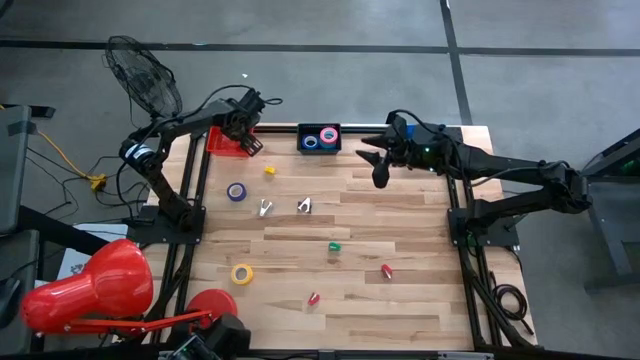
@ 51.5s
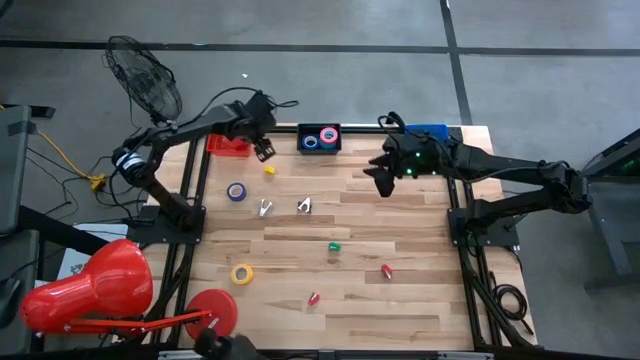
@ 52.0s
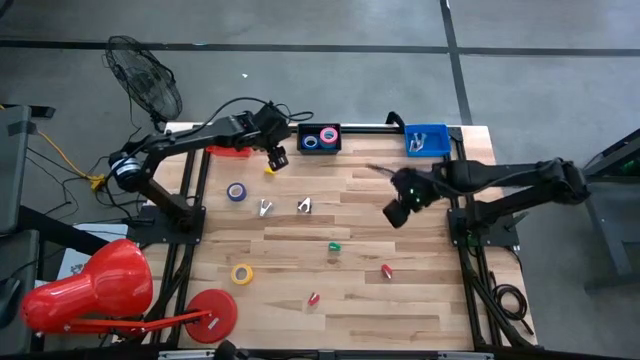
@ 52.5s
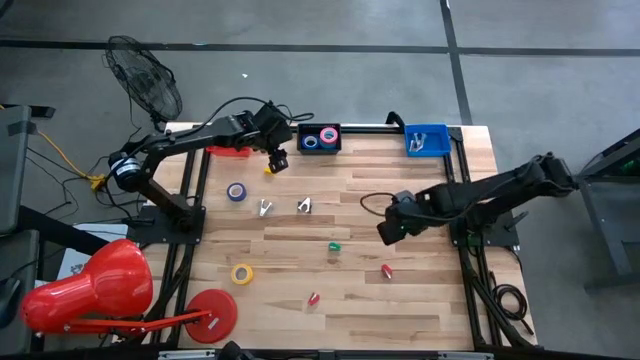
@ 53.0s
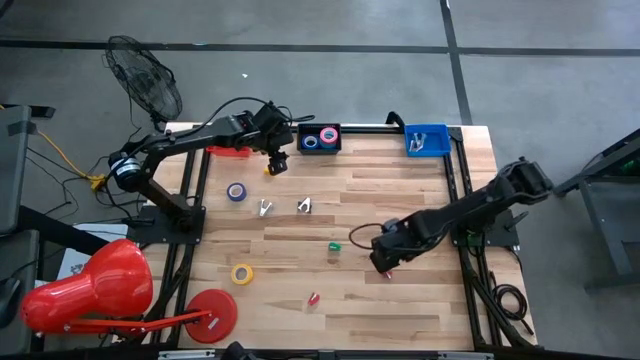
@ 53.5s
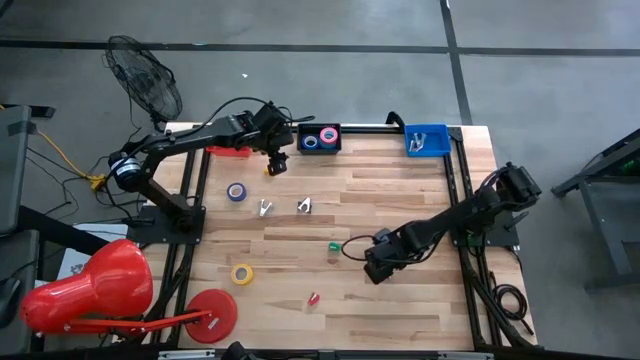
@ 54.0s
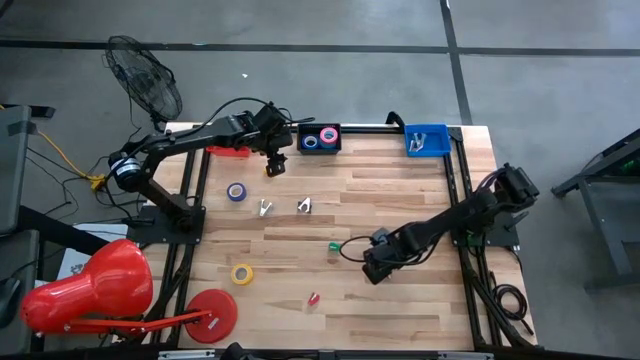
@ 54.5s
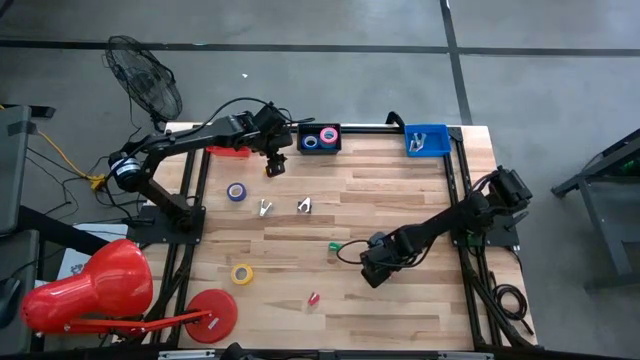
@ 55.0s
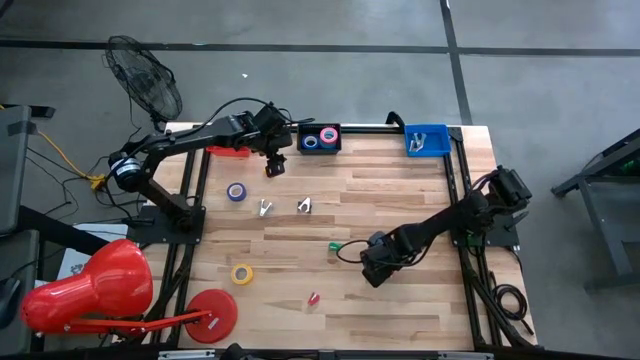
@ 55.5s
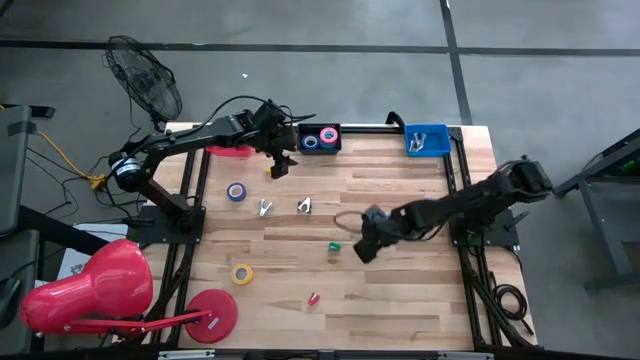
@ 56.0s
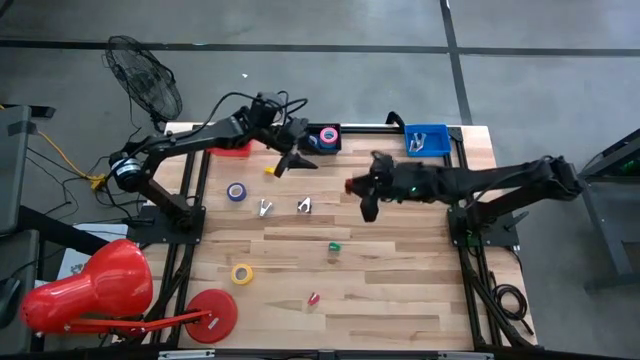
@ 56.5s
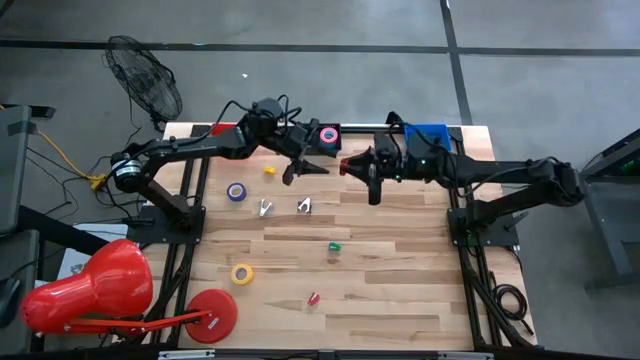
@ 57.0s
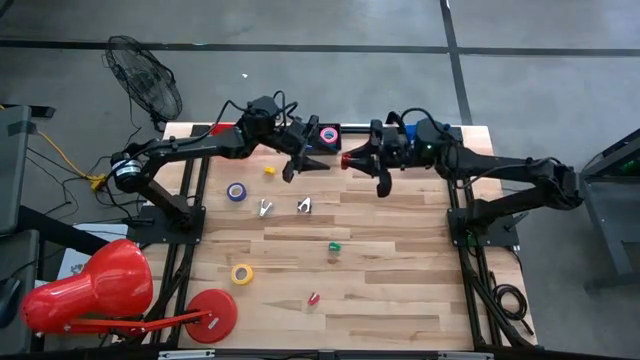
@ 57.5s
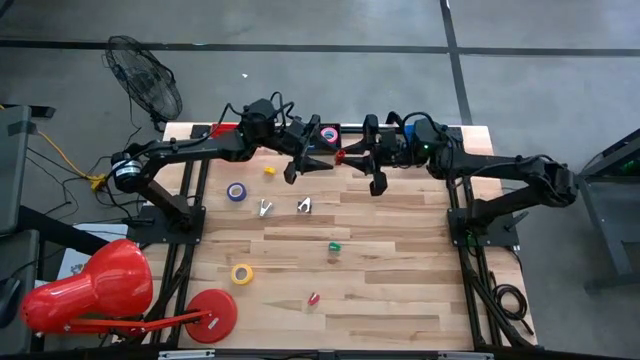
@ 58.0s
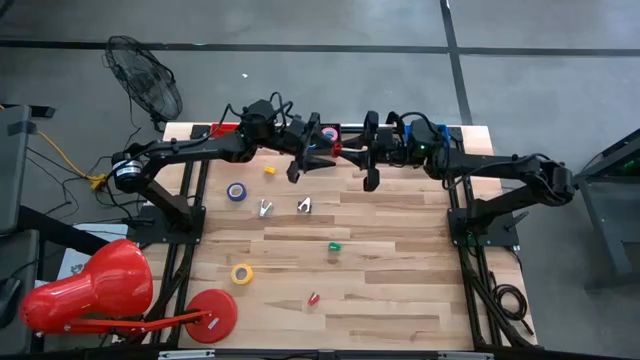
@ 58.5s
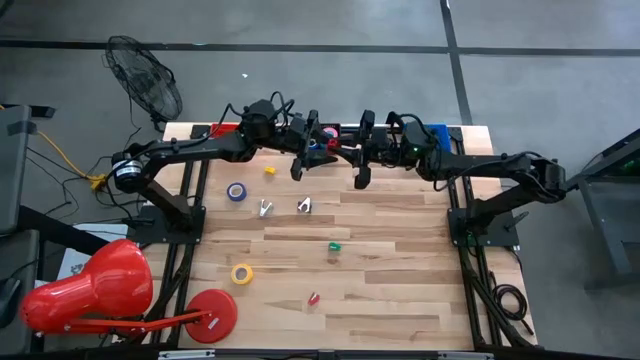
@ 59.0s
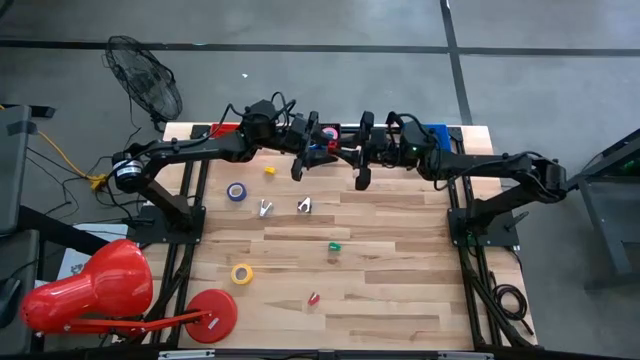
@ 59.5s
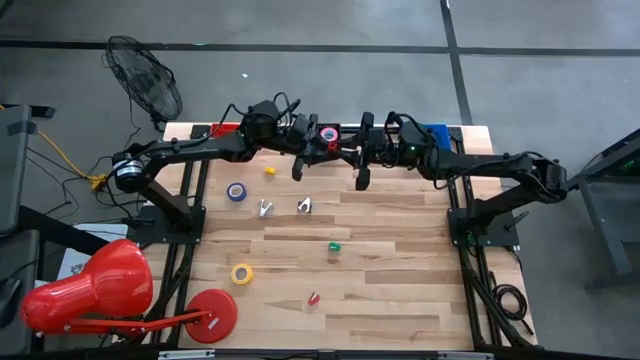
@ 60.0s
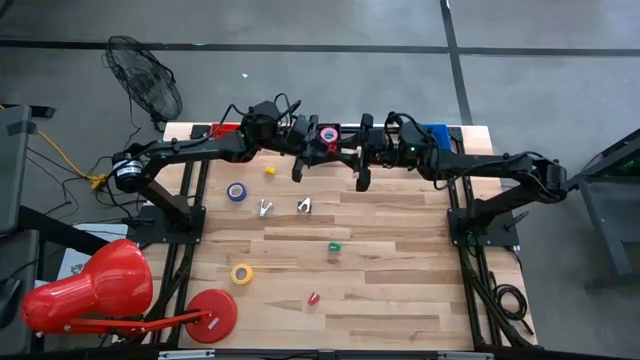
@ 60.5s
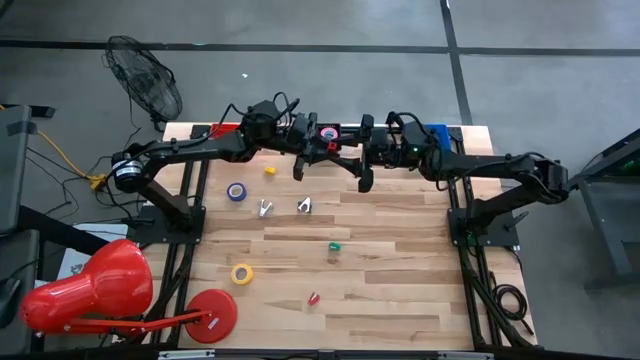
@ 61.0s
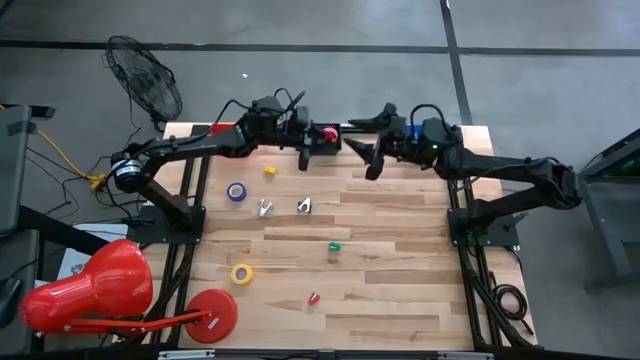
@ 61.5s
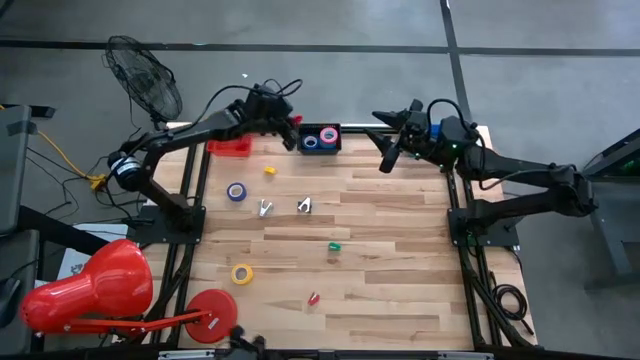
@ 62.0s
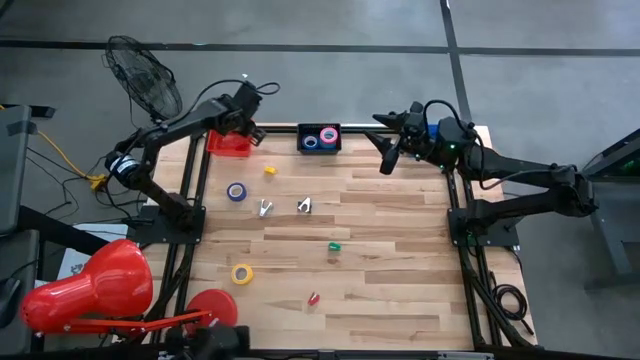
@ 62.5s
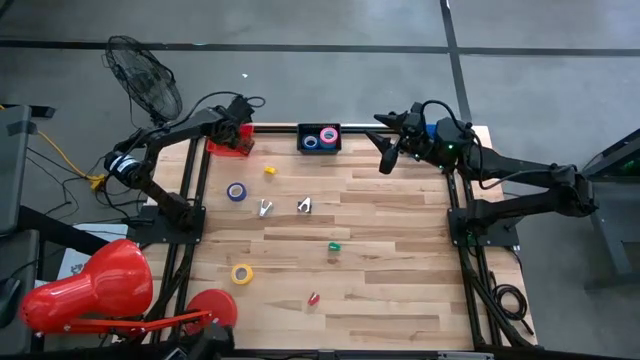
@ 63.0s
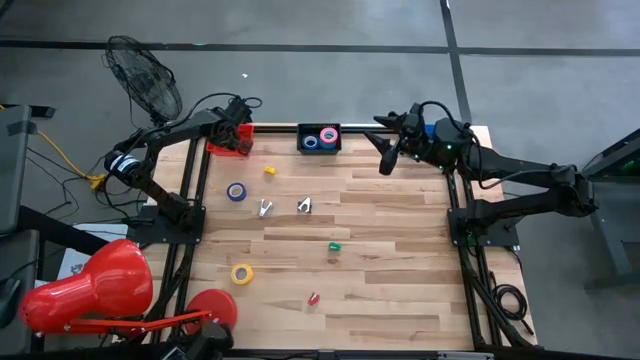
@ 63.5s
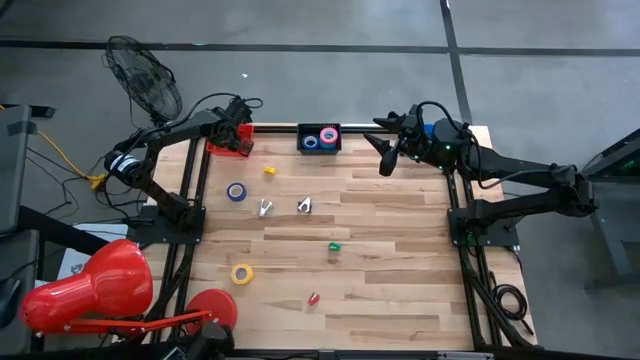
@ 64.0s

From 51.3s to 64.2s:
Task: Pick and place Stapler, Stapler remover, tape
Put the right red stapler into the red bin

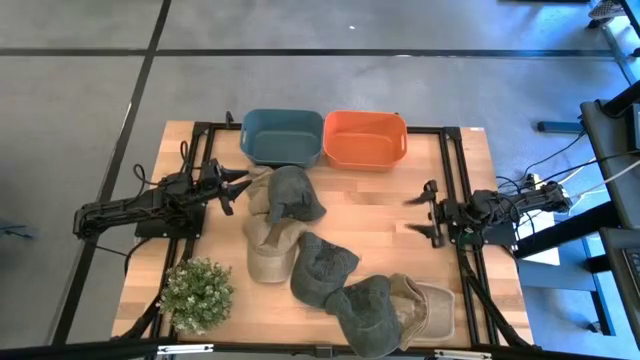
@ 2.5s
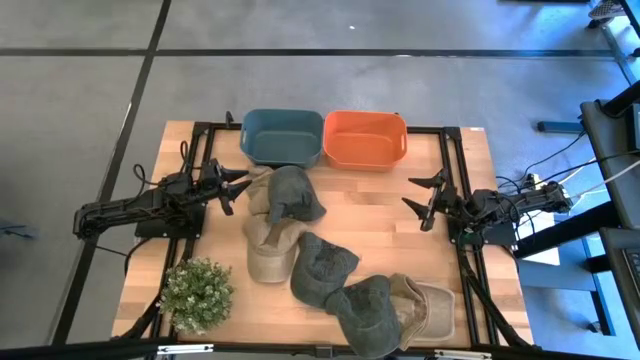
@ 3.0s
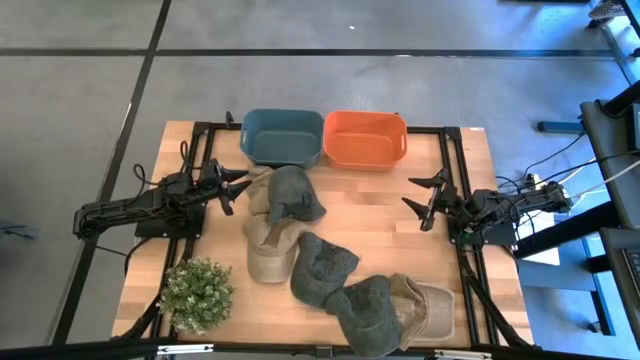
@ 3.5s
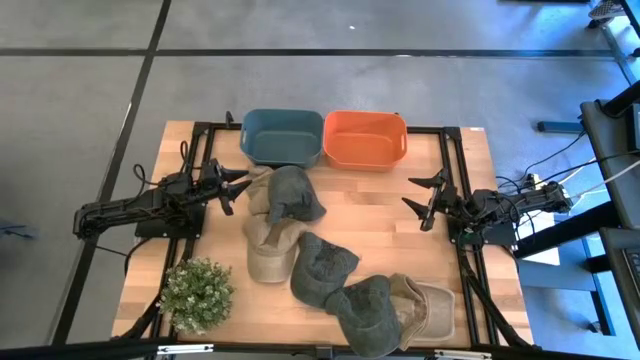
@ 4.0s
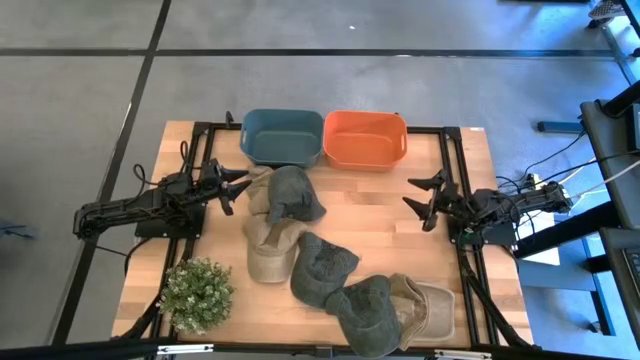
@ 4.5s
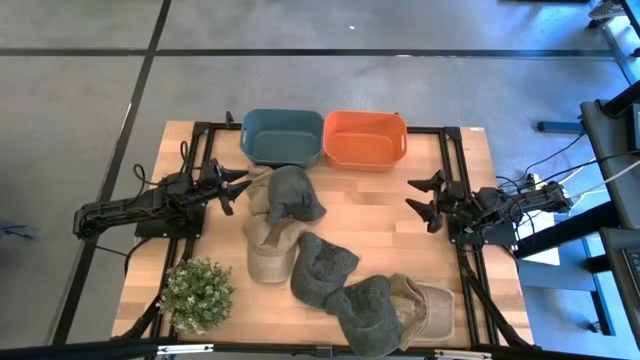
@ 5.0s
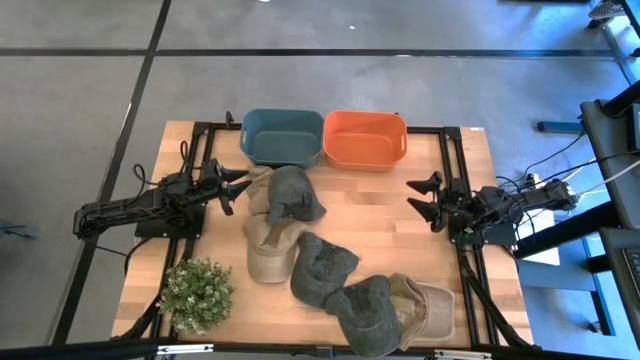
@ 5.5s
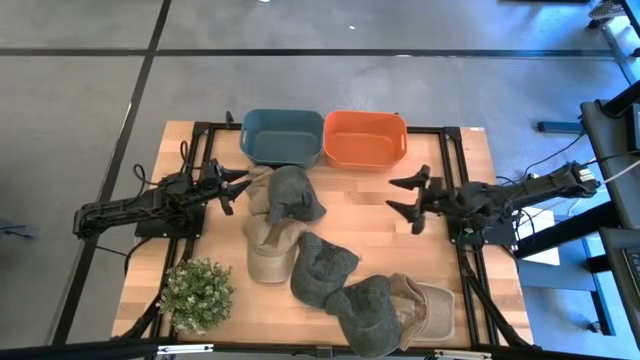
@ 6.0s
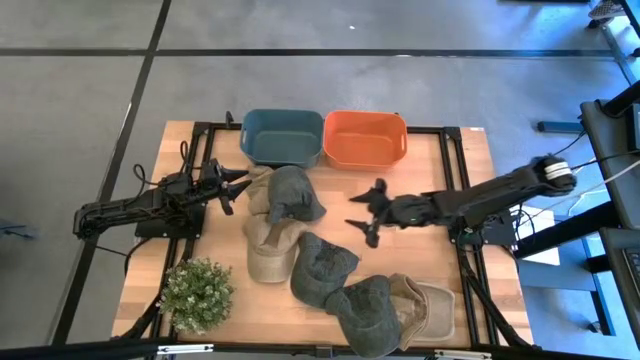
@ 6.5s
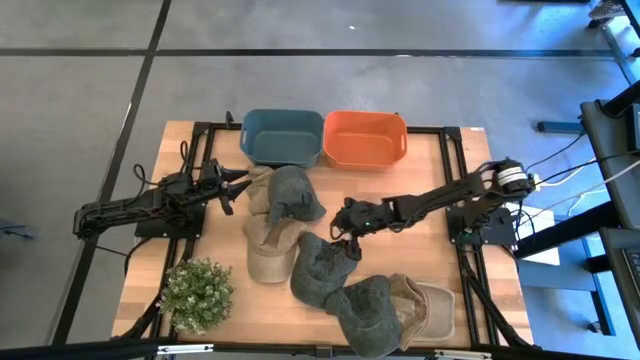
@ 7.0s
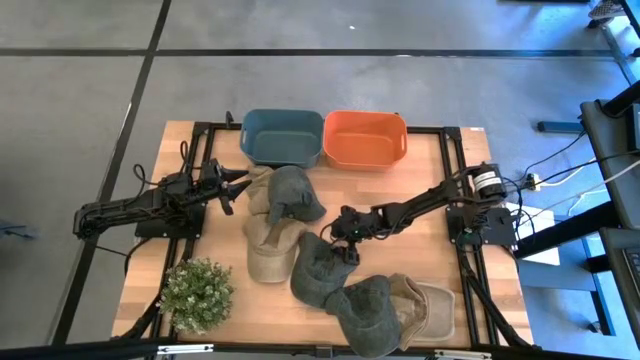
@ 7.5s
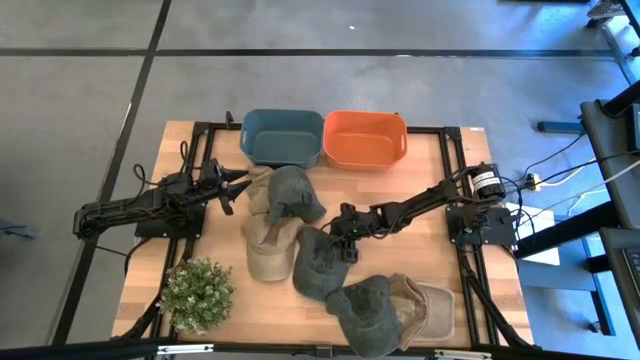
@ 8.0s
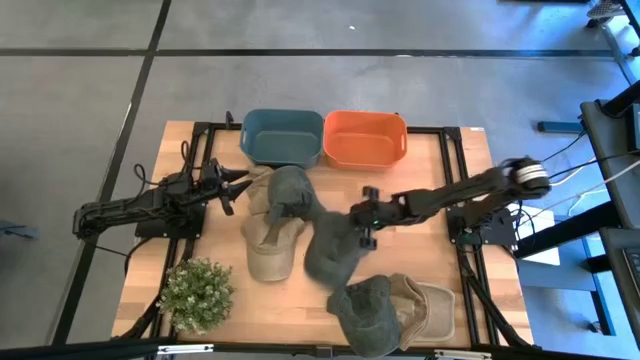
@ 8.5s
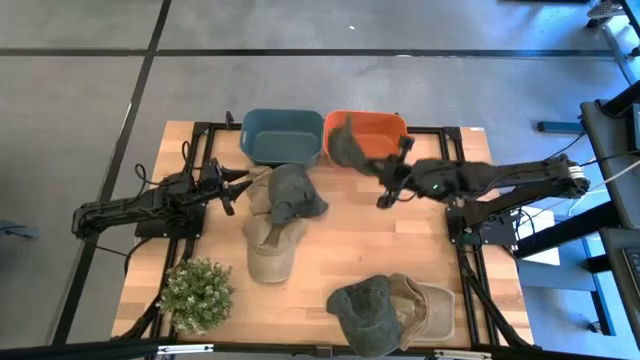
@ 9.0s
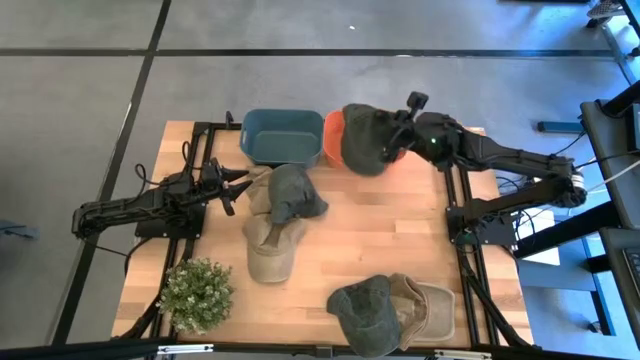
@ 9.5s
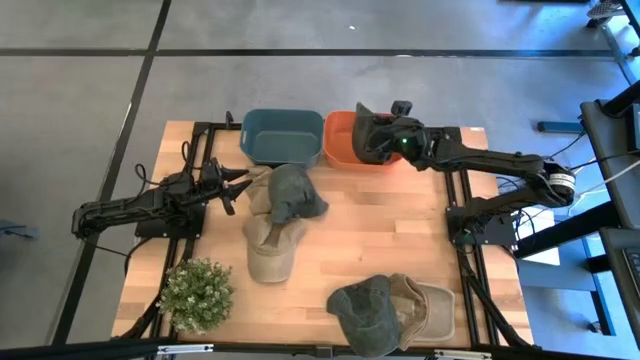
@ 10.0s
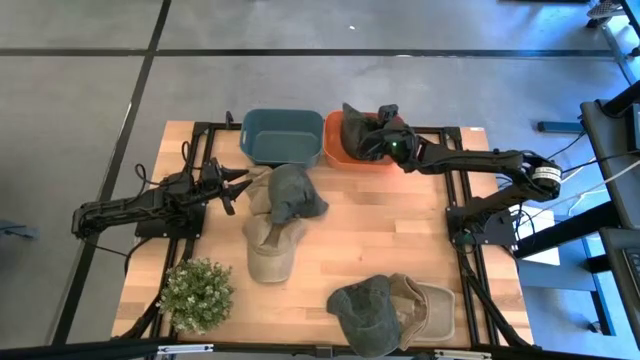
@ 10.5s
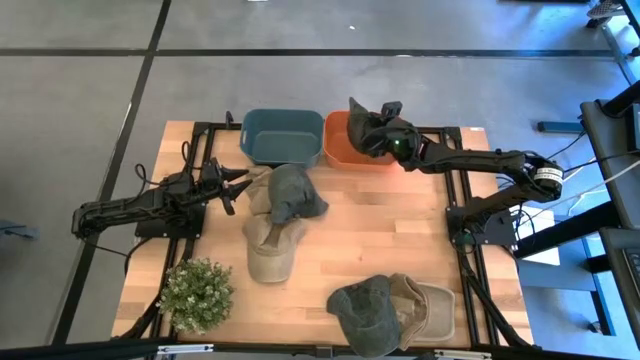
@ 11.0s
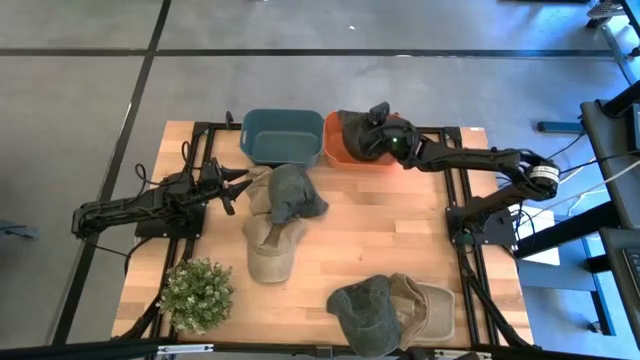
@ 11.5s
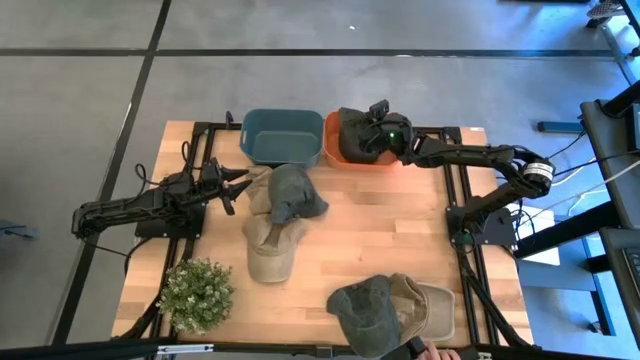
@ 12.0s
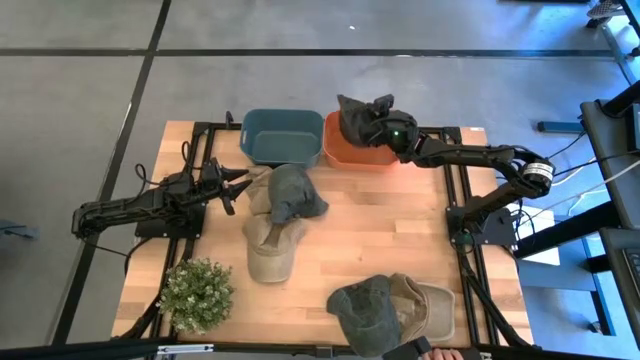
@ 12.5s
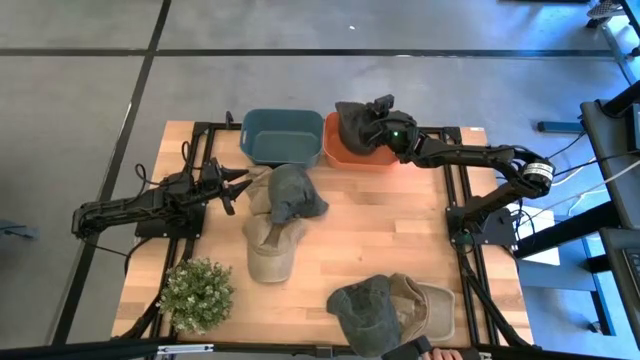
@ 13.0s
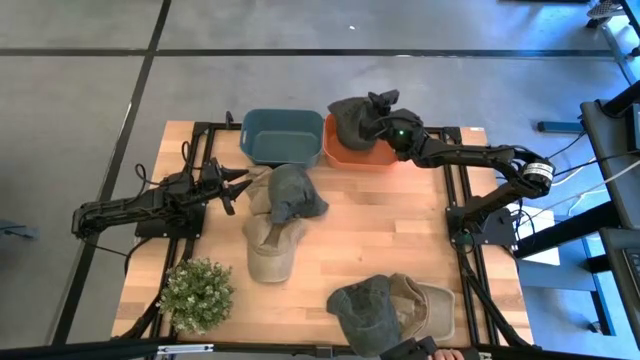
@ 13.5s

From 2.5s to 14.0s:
Task: Pick & Place hat
Put the middle black cap into the orange bin
